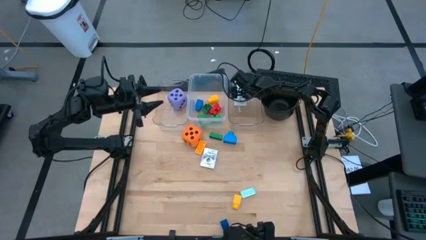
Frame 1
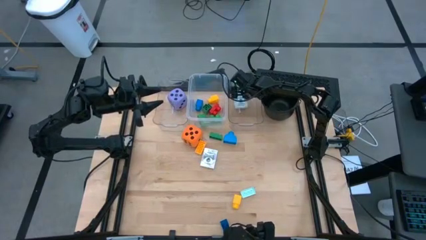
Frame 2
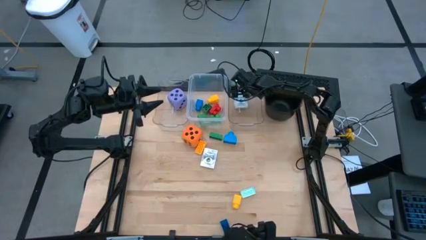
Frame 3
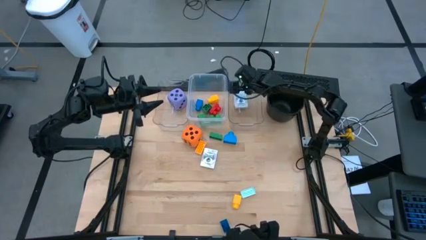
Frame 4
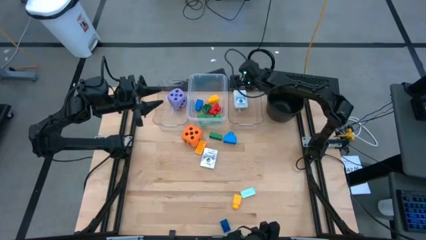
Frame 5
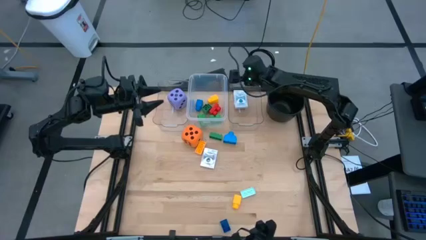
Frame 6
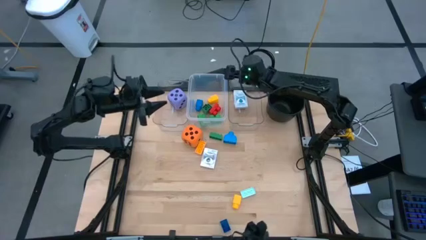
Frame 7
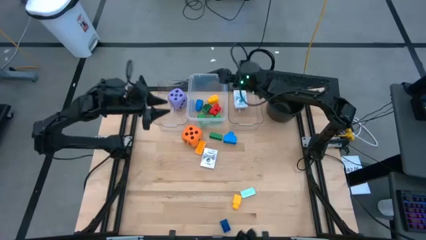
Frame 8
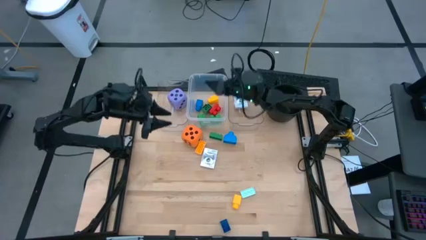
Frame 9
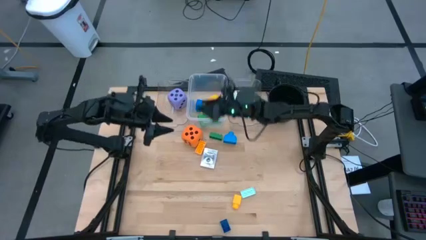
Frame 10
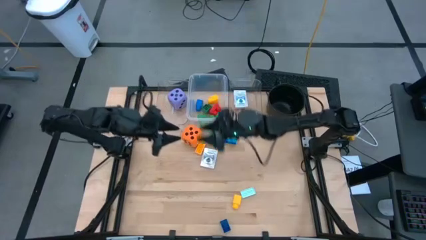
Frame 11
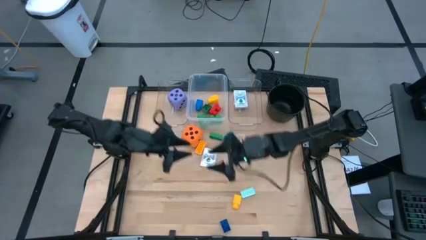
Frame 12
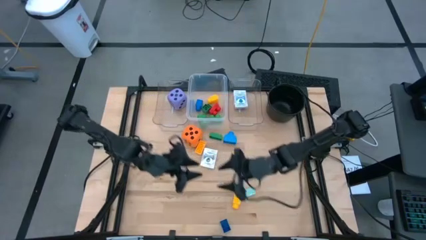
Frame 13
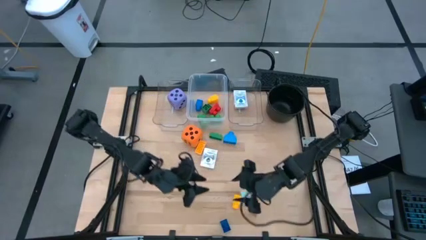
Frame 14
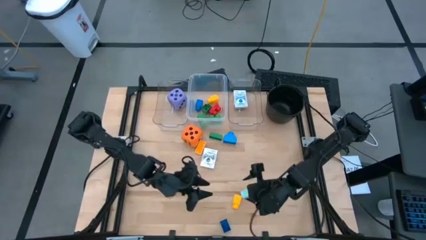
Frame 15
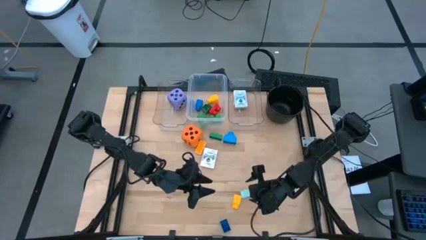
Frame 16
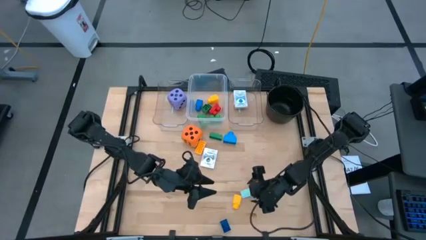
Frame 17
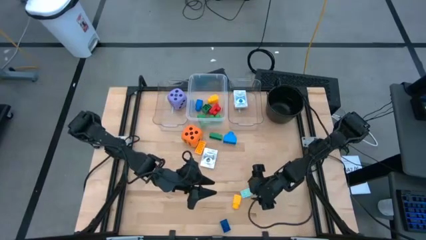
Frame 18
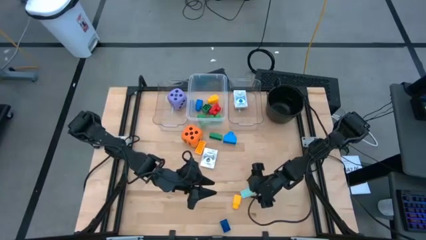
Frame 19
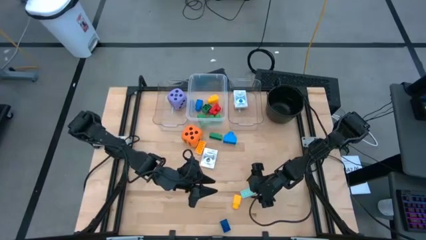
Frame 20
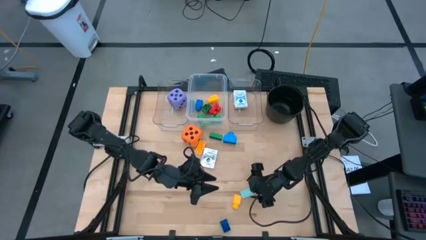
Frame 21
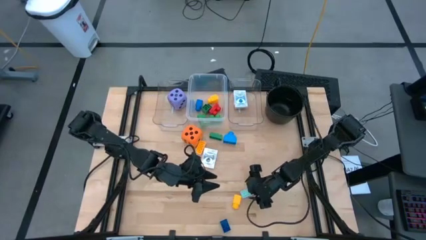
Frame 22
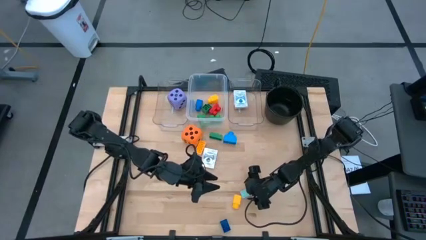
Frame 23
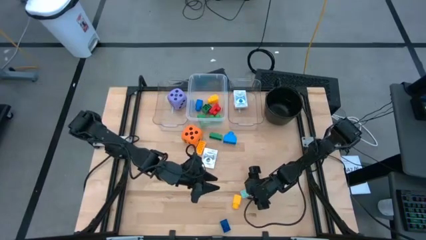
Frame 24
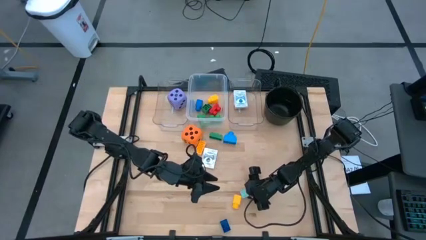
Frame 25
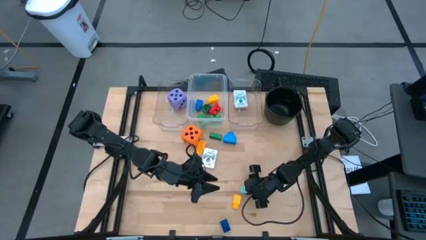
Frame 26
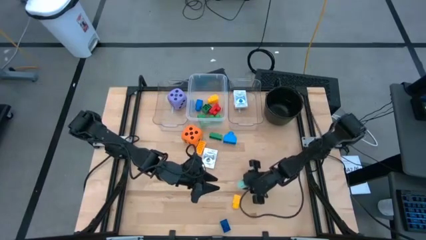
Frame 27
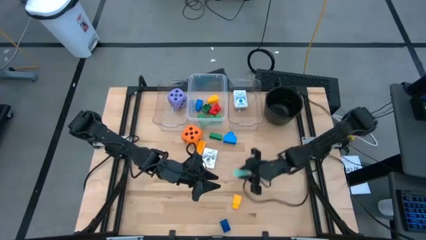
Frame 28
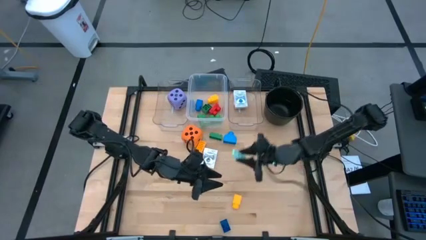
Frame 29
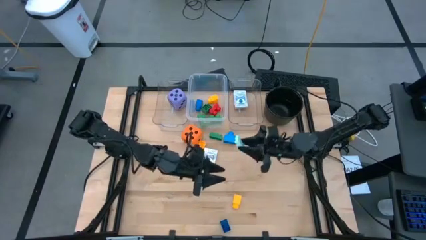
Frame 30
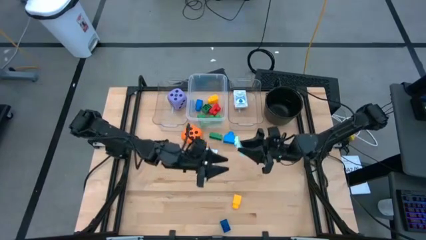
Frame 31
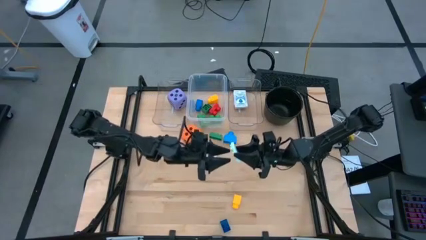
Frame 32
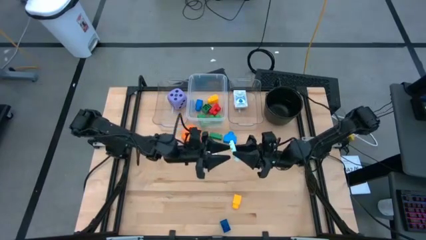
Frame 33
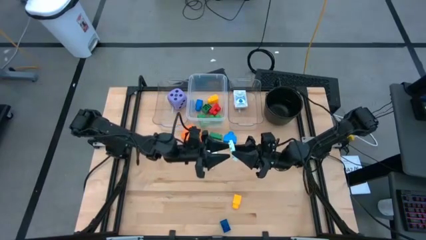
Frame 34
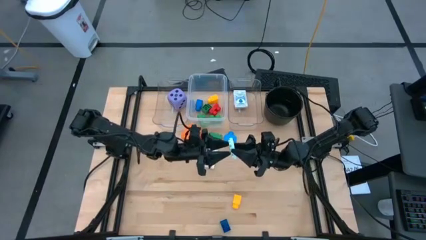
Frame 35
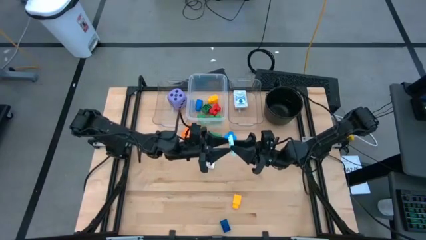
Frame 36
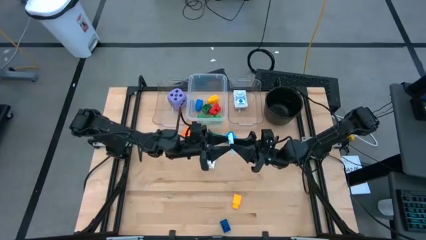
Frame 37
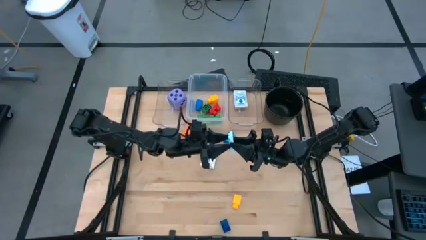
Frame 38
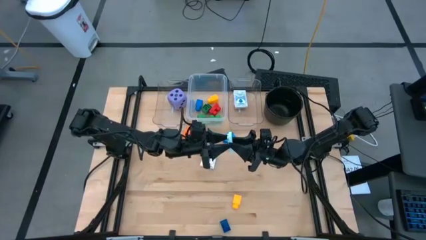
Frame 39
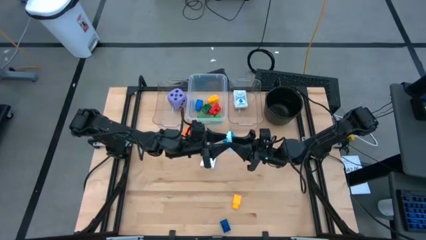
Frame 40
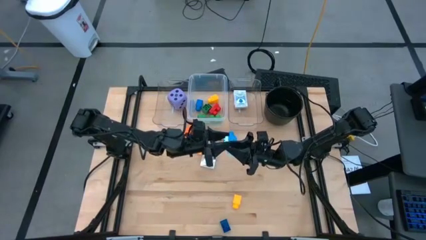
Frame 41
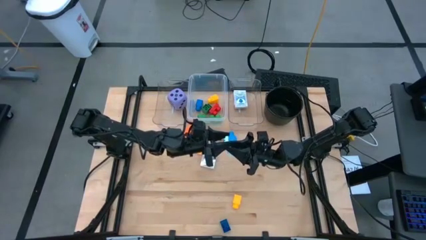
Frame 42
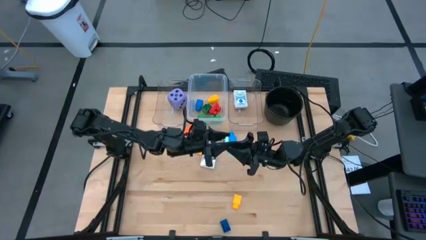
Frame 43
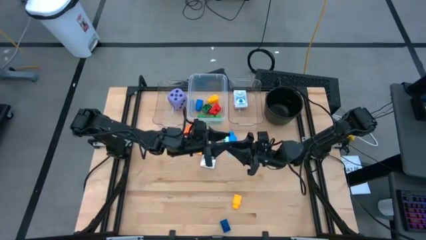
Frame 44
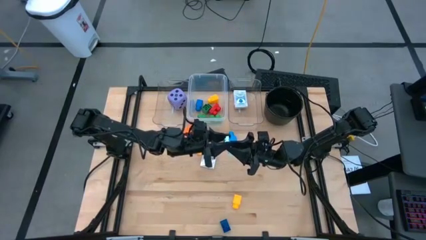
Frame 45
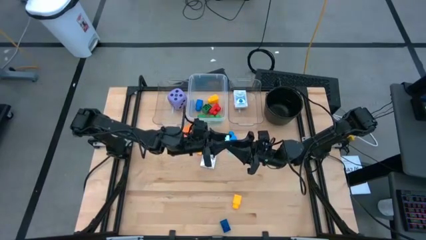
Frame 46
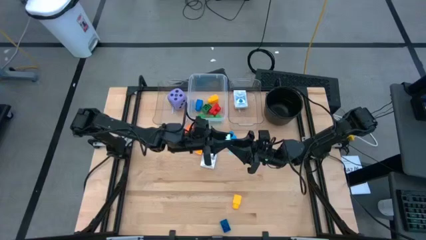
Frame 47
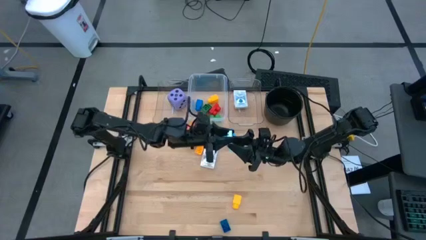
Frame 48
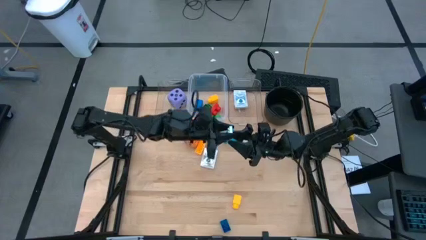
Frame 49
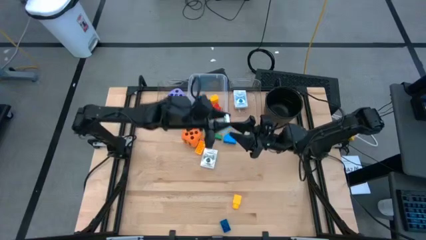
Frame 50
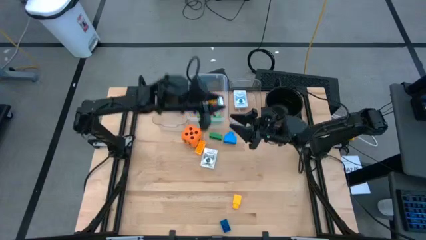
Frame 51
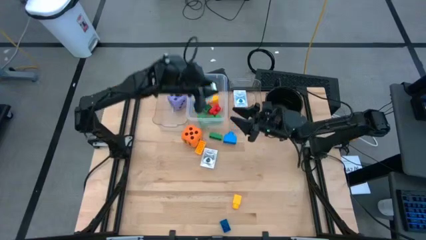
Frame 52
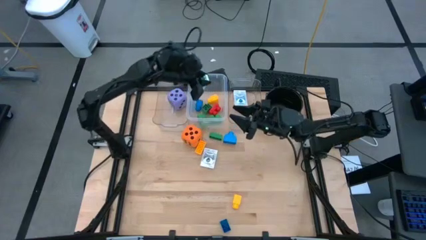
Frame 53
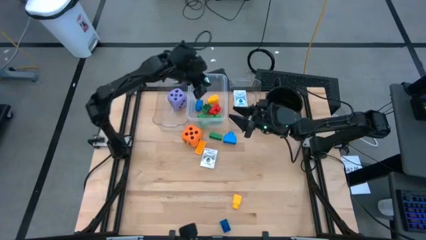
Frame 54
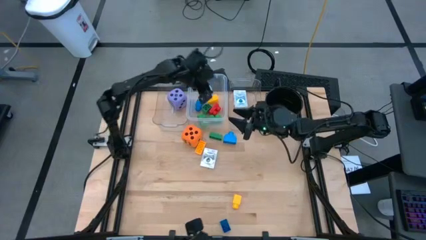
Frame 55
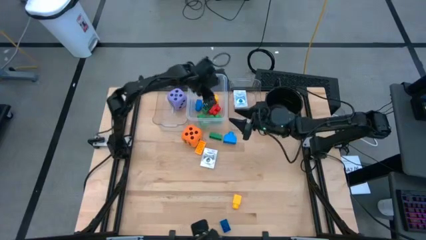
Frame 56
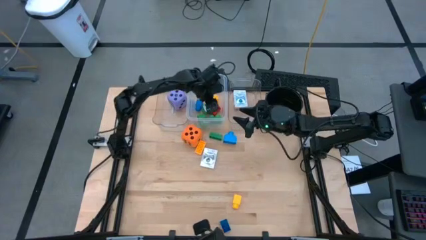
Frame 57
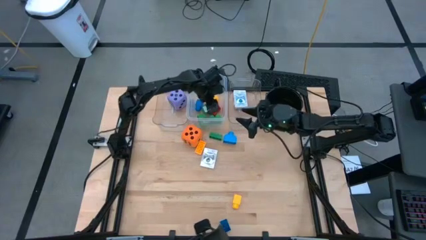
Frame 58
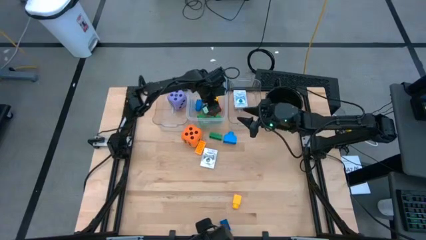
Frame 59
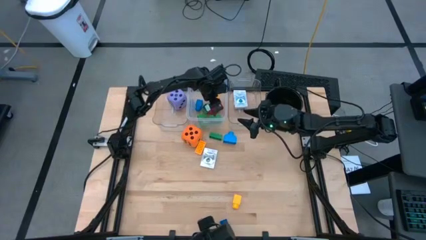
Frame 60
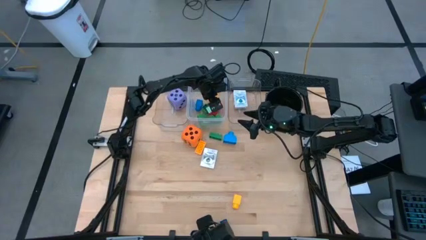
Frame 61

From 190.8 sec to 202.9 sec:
Task: Pick & Place Toys
Put the light blue eight stud game piece into the middle transparent bin

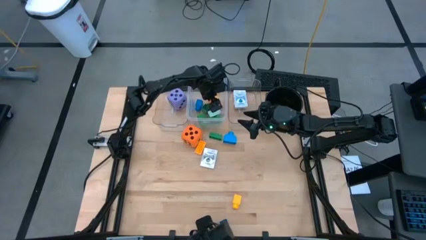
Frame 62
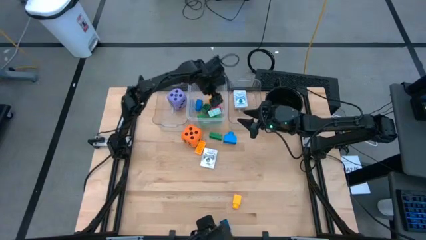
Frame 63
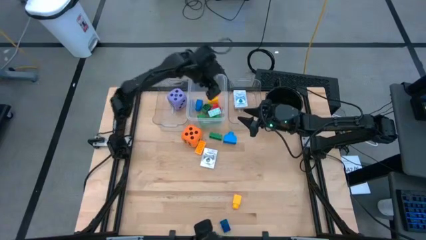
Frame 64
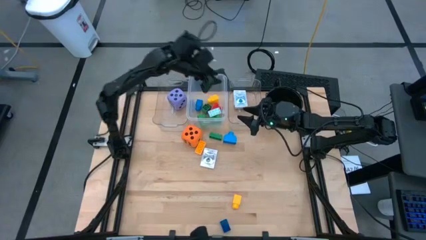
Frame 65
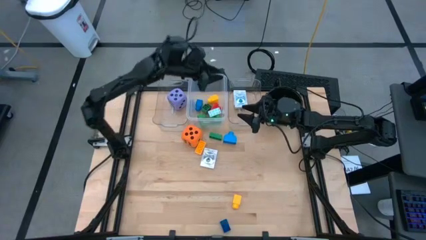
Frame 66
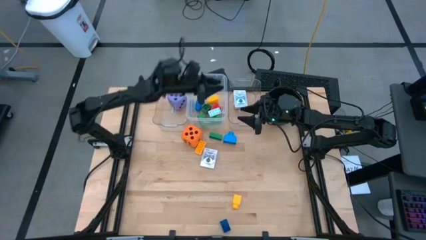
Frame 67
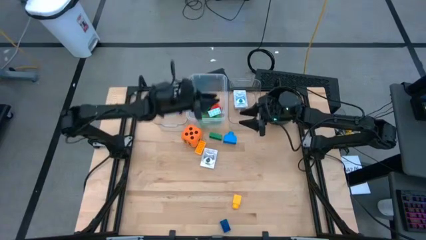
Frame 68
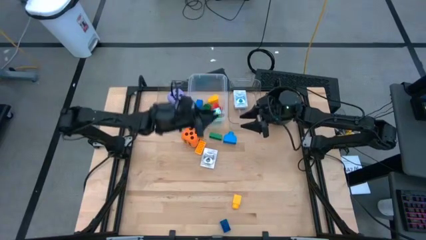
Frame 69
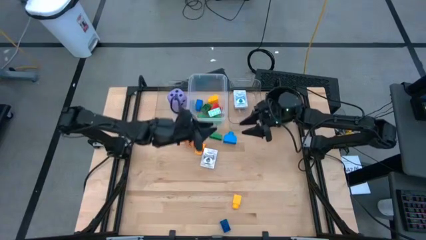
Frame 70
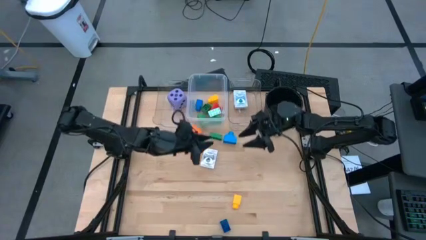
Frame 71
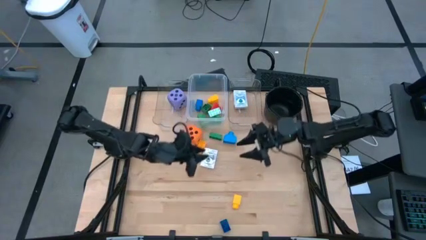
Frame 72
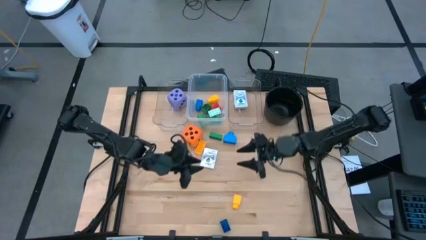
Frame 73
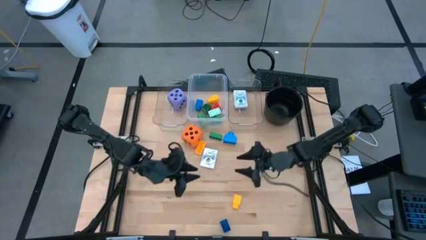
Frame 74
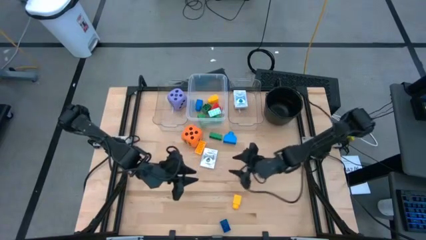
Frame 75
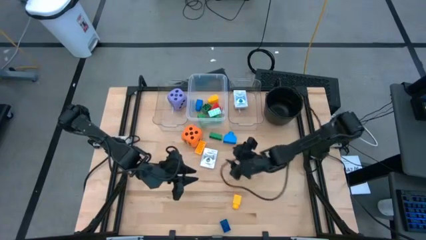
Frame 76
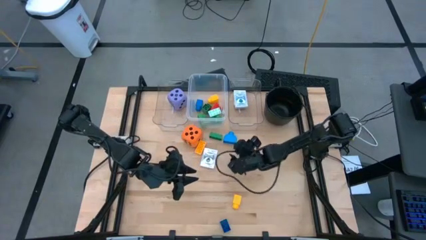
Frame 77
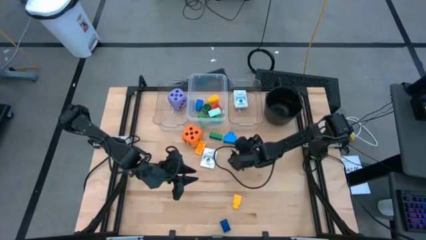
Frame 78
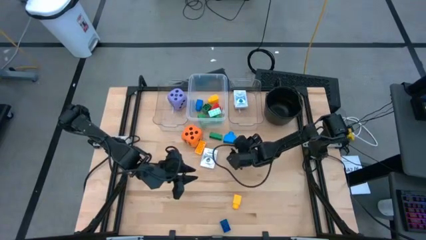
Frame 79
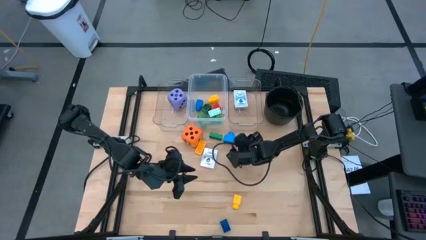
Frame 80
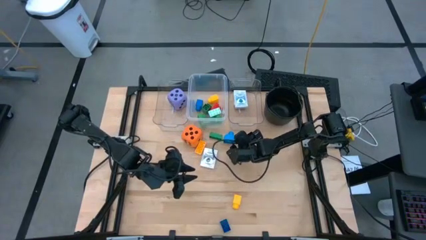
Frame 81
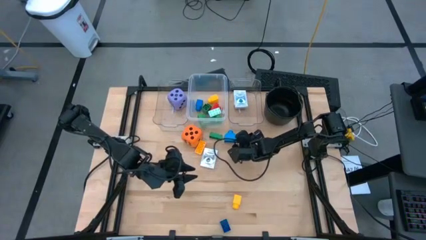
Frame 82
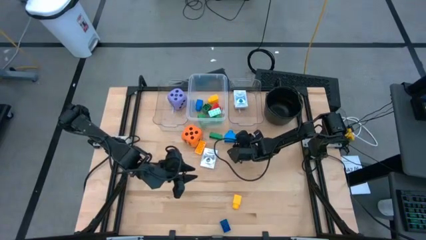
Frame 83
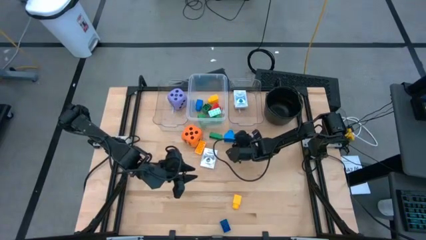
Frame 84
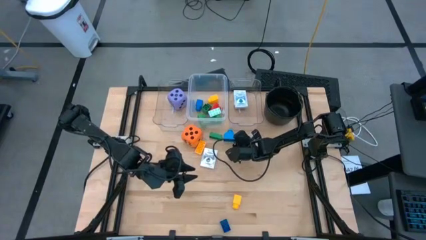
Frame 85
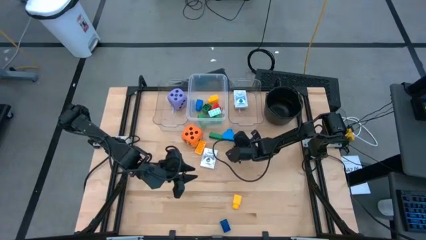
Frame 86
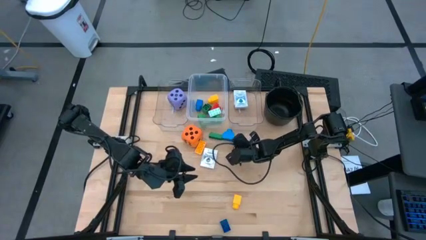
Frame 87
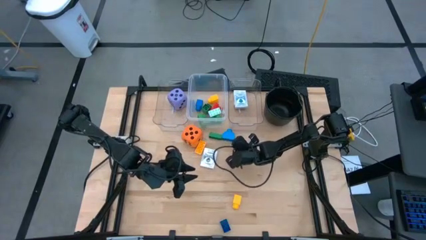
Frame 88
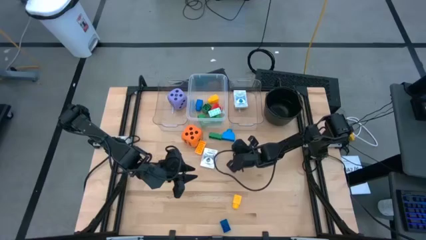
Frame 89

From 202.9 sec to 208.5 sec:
Put the light blue stud game piece into the middle transparent bin
